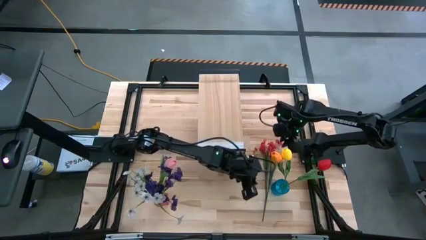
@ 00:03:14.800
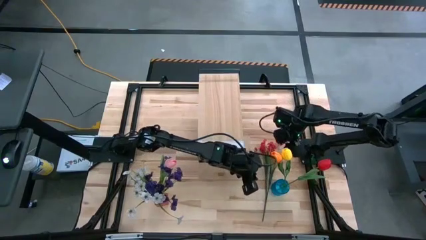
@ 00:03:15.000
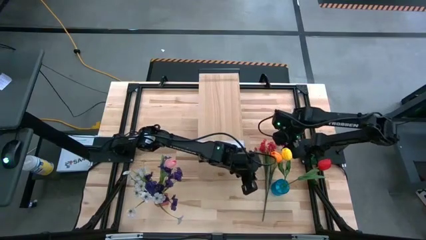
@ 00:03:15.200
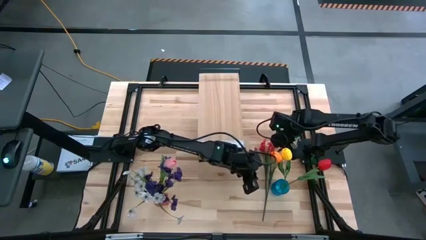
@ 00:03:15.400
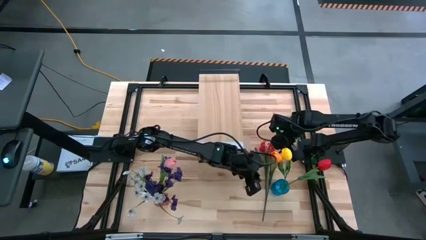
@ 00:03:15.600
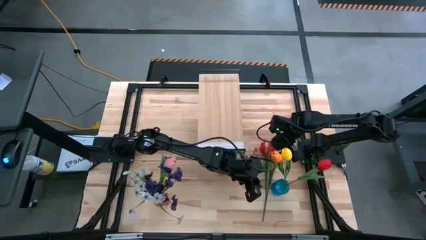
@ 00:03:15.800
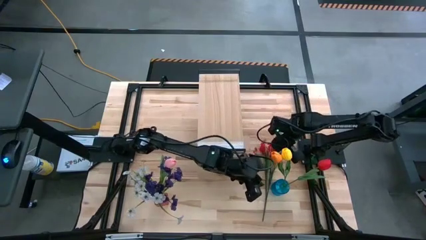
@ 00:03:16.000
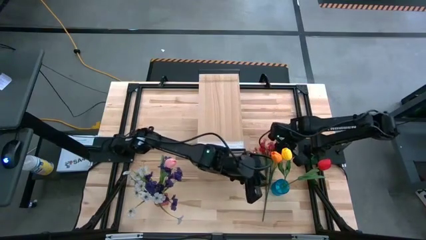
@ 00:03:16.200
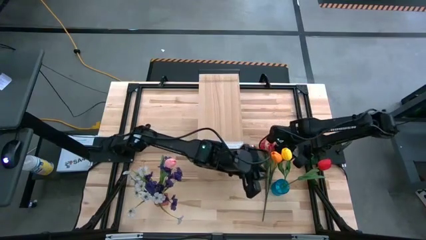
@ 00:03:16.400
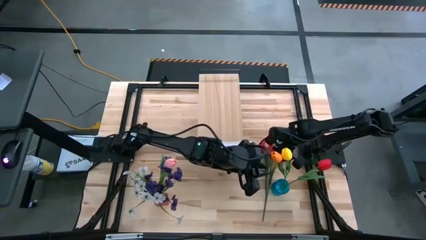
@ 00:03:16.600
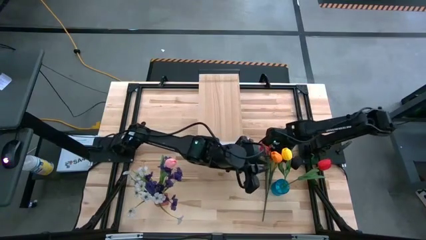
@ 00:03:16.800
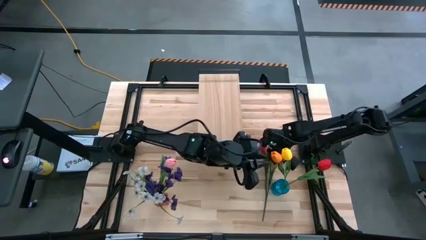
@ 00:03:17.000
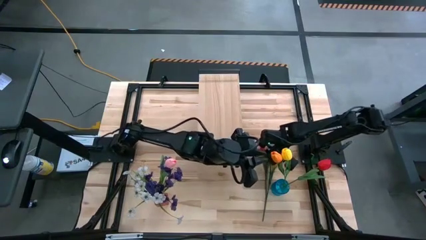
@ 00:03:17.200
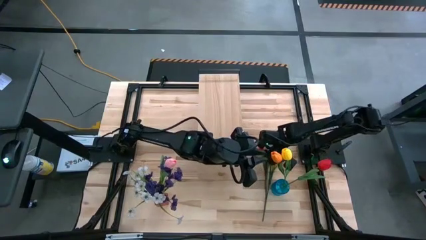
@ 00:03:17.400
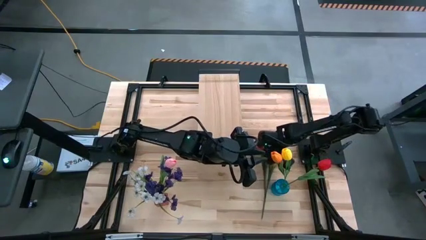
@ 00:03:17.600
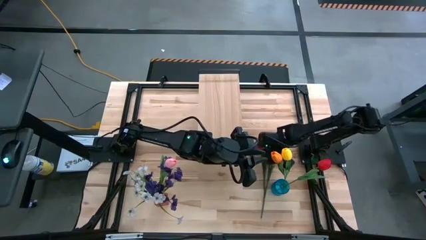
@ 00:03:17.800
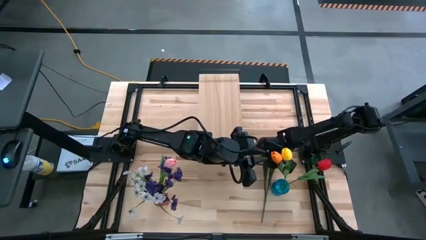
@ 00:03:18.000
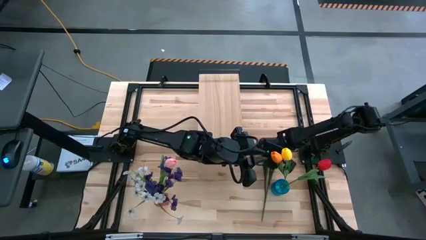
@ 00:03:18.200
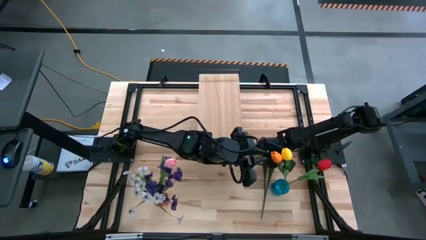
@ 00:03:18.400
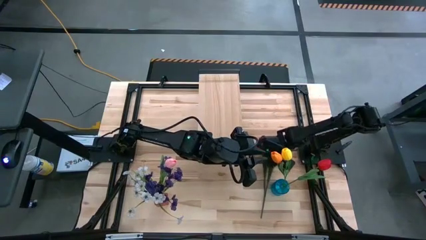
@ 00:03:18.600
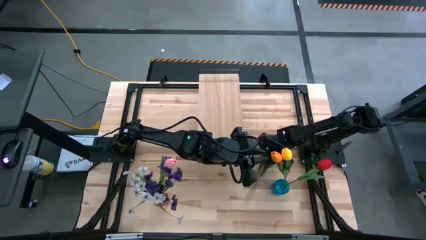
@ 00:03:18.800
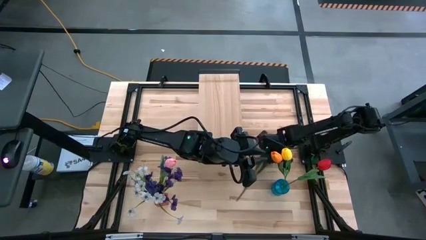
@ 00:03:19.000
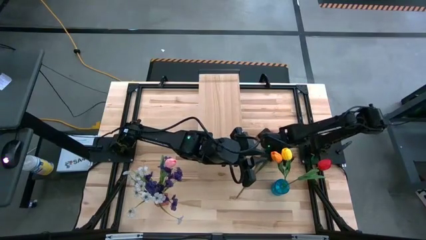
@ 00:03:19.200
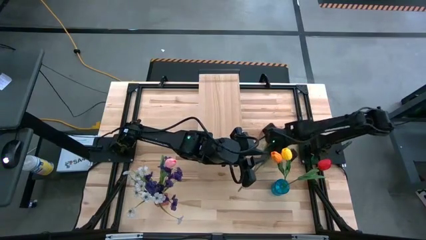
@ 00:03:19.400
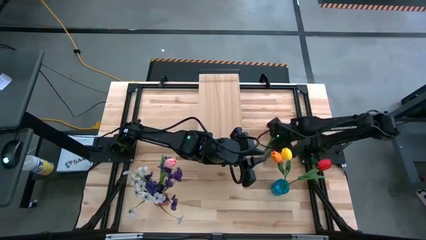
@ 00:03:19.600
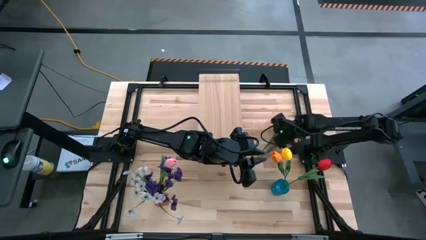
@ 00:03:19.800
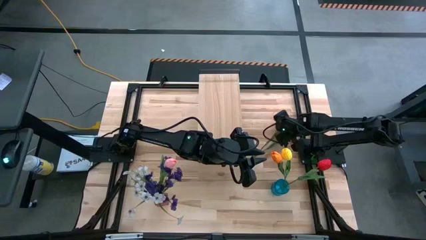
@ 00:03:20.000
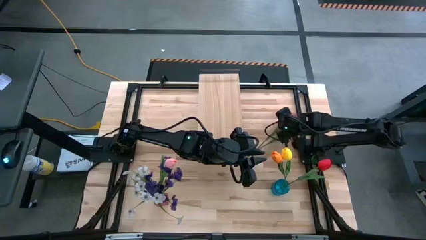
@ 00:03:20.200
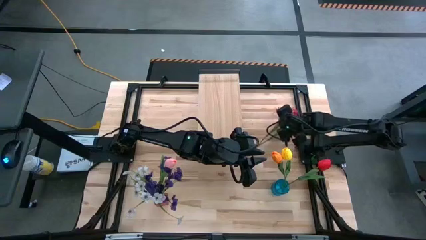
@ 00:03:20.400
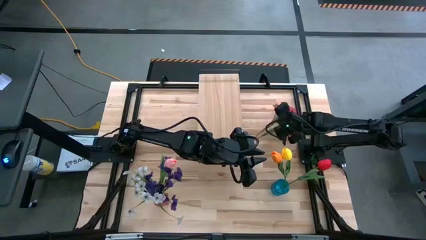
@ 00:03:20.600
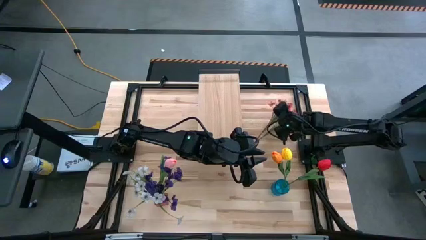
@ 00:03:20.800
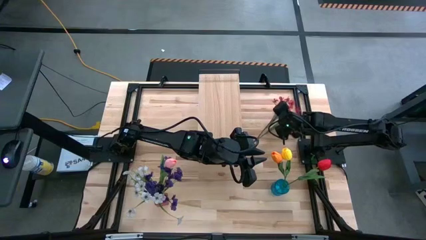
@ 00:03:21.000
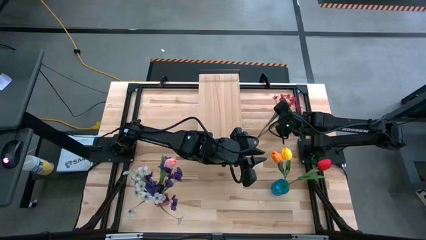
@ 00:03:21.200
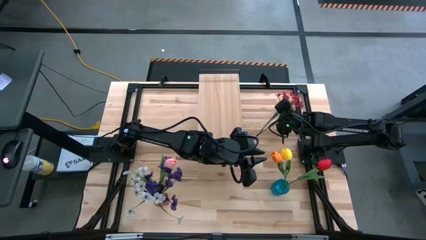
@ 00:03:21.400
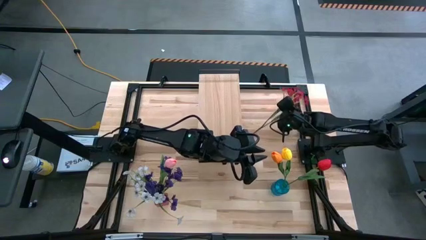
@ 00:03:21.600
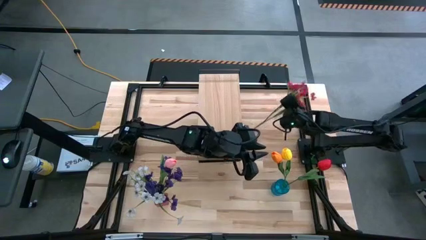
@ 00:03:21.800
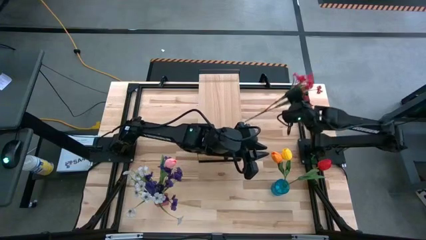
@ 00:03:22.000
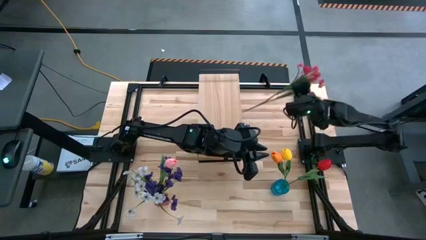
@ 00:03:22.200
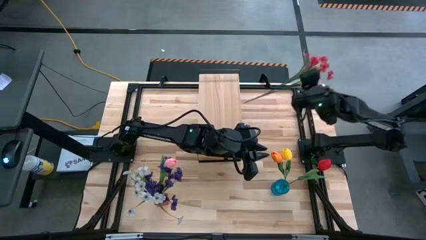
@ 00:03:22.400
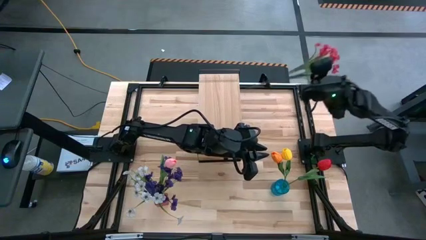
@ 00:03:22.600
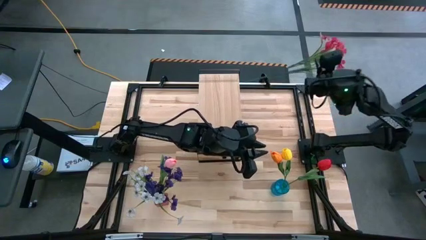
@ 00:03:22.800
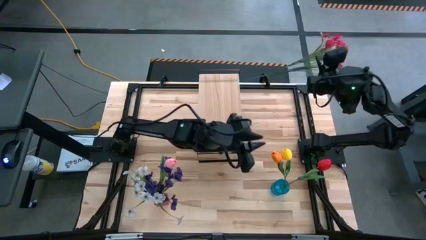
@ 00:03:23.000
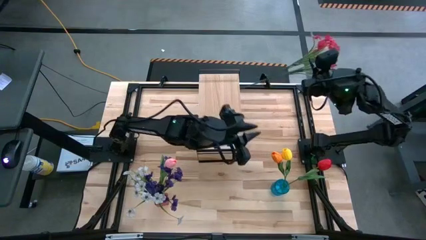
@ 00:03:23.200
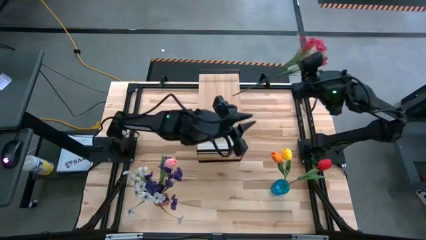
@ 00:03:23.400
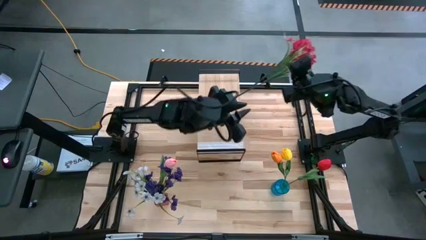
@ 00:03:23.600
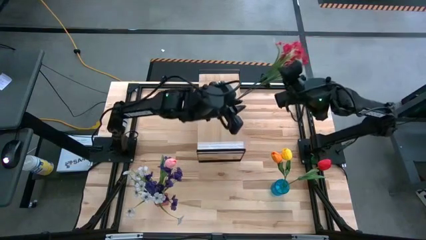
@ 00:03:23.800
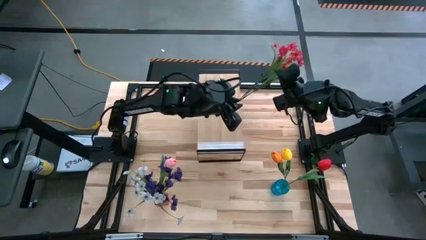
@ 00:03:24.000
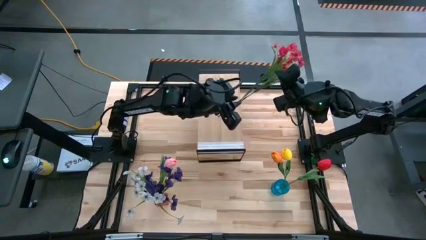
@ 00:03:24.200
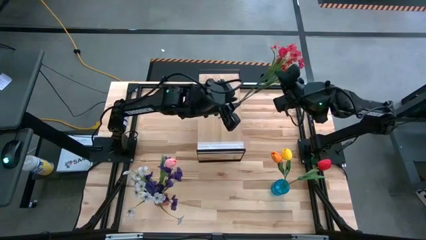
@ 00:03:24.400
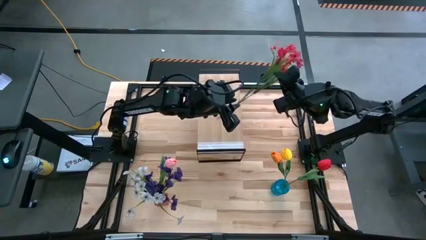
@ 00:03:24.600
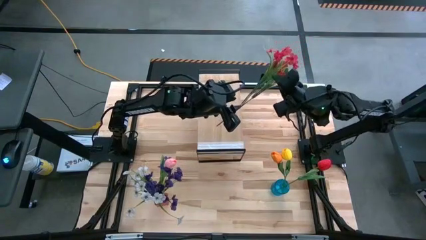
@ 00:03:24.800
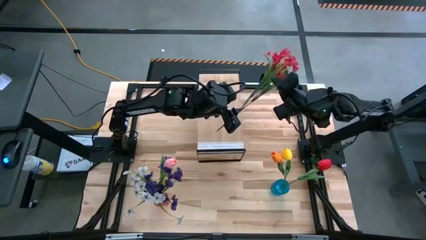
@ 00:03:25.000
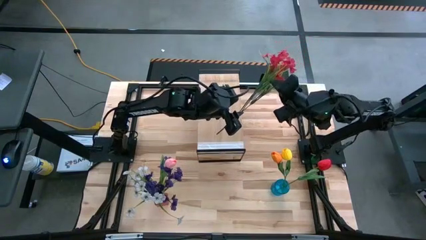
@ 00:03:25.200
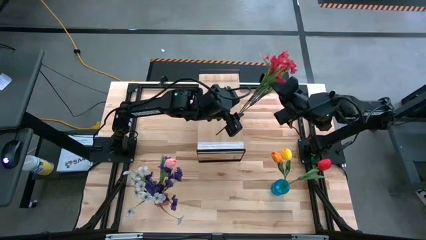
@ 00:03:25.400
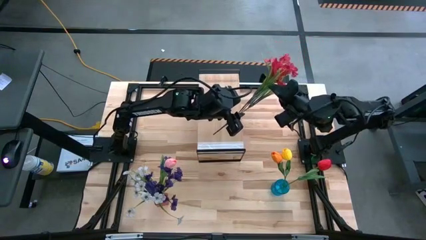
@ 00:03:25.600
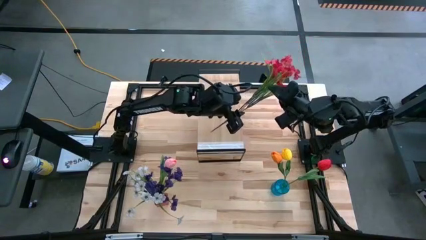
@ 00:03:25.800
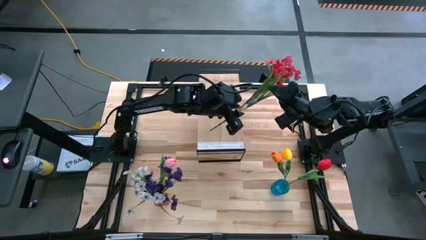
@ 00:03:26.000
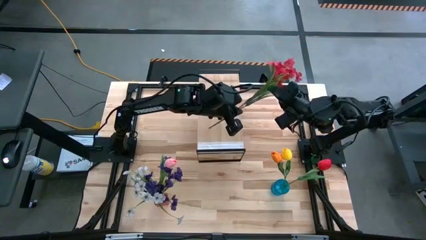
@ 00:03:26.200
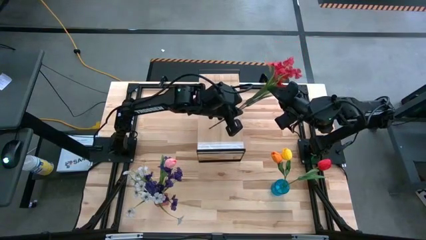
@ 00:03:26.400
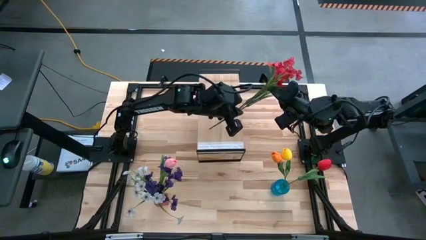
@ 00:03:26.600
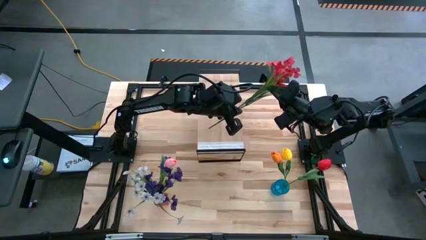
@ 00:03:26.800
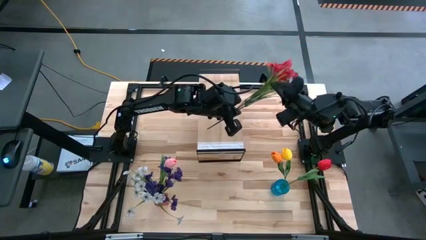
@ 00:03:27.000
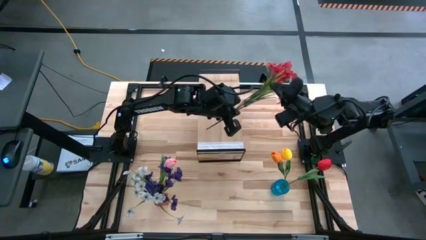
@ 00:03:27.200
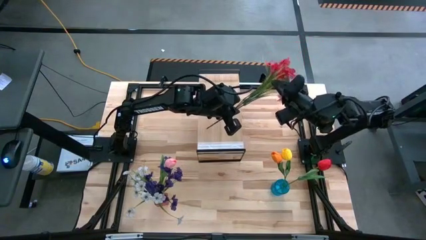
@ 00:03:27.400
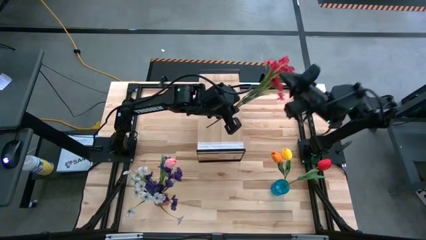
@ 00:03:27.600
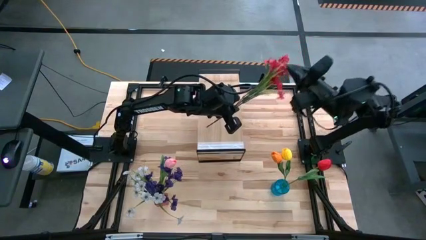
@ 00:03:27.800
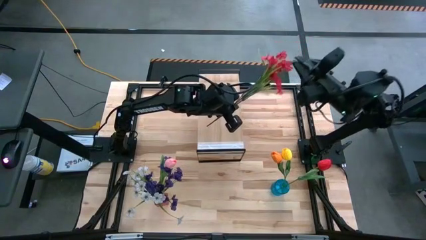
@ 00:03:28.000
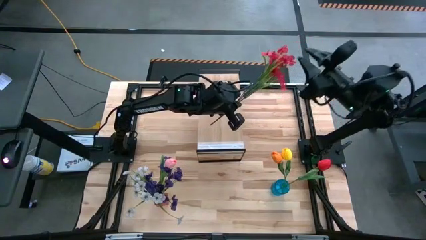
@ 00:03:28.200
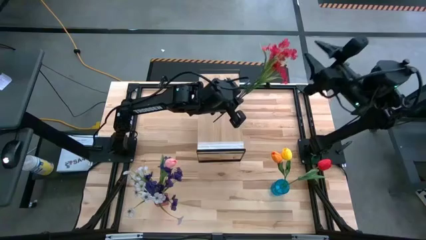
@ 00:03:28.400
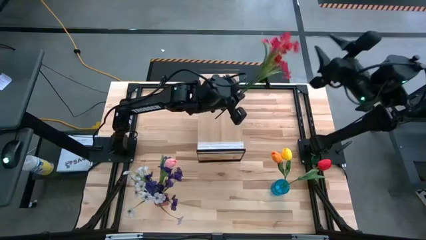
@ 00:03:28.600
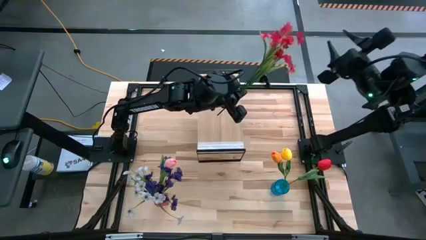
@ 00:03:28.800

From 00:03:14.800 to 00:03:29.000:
Task: Pick and place flowers into a vace then onto a shelf
Put the red flowers into the blue vase
